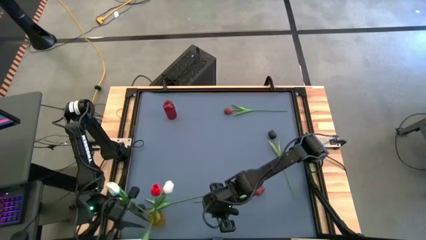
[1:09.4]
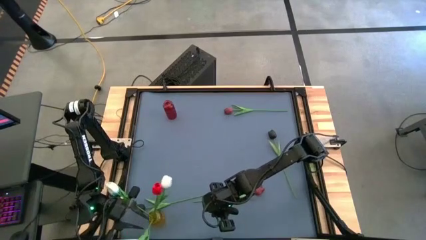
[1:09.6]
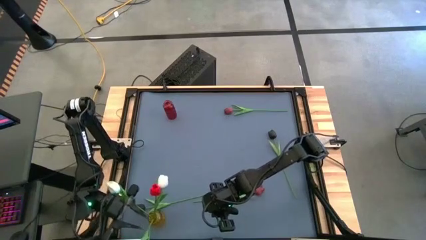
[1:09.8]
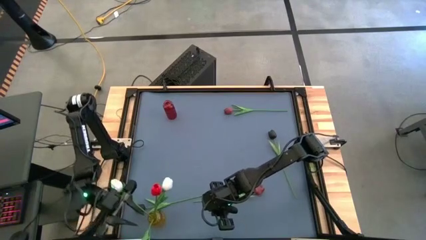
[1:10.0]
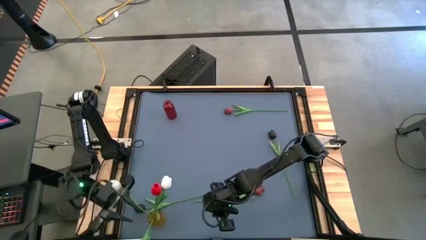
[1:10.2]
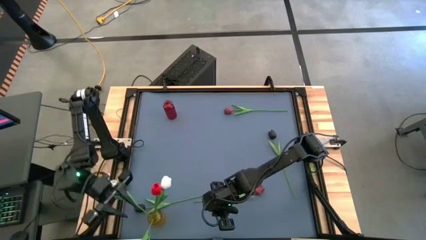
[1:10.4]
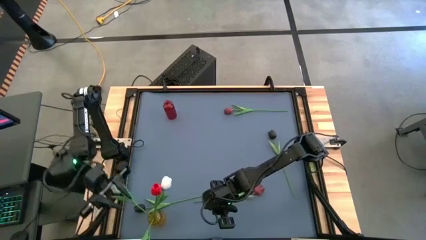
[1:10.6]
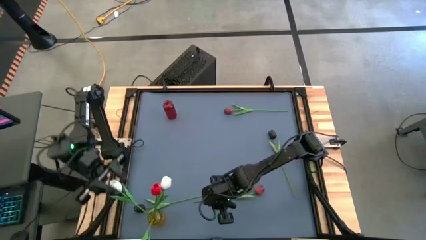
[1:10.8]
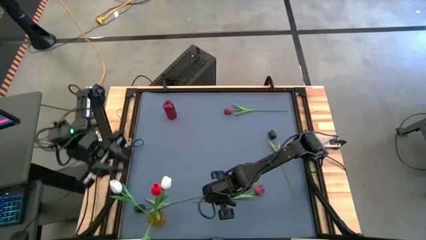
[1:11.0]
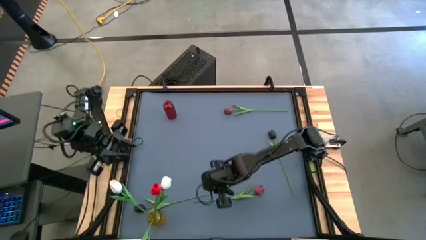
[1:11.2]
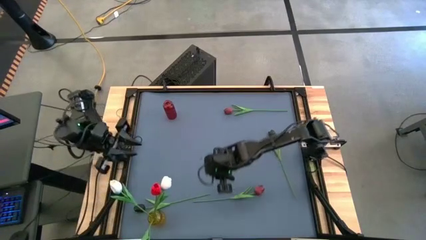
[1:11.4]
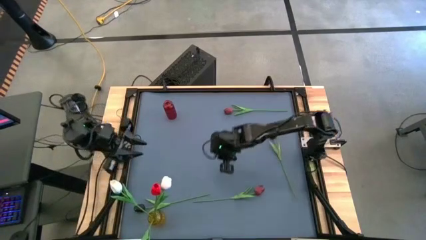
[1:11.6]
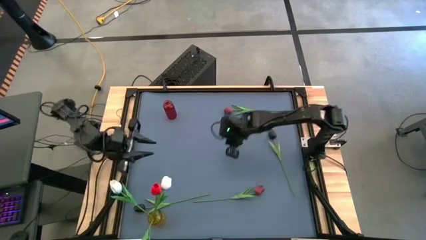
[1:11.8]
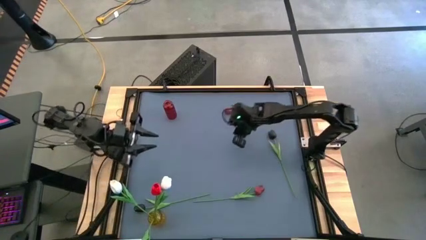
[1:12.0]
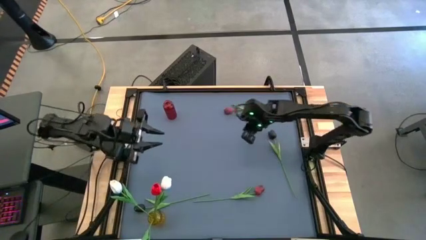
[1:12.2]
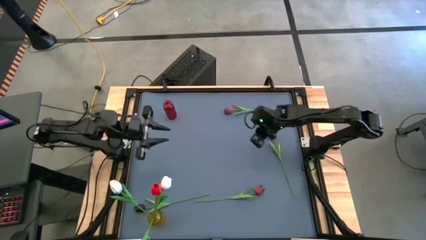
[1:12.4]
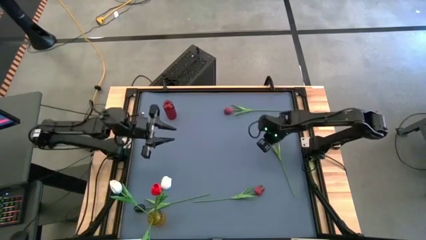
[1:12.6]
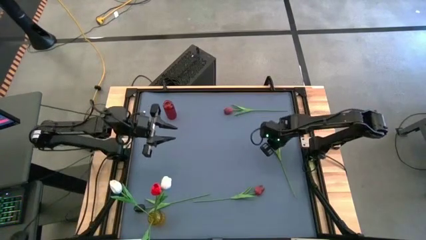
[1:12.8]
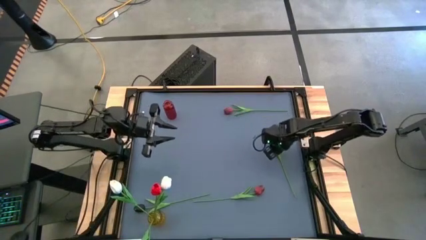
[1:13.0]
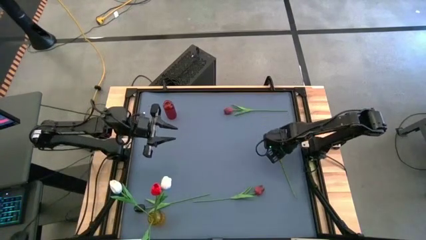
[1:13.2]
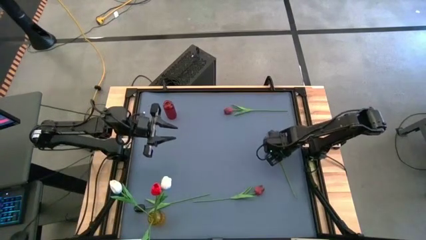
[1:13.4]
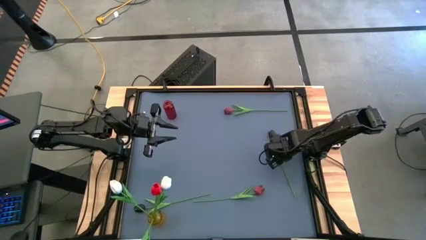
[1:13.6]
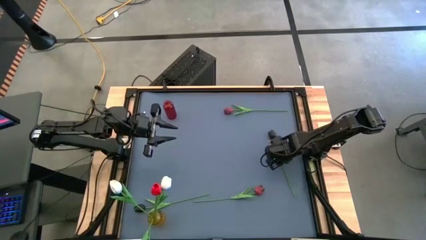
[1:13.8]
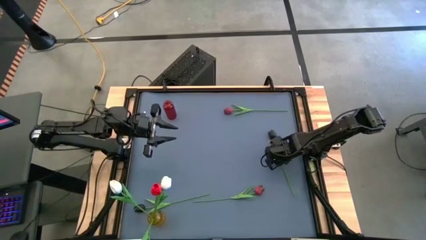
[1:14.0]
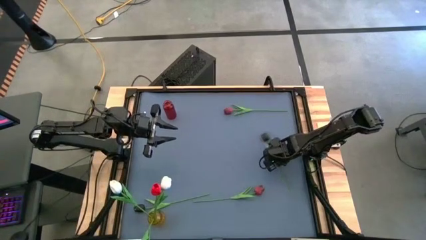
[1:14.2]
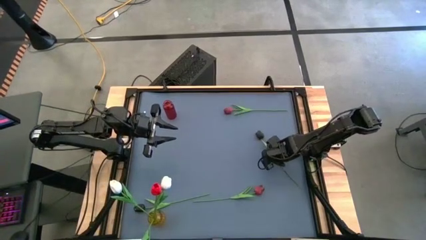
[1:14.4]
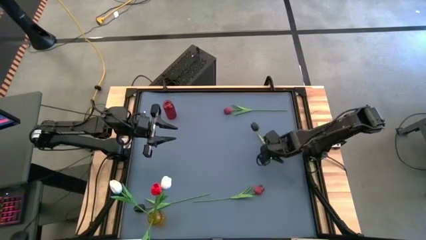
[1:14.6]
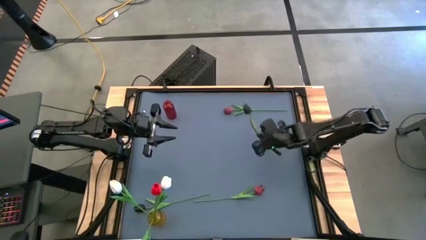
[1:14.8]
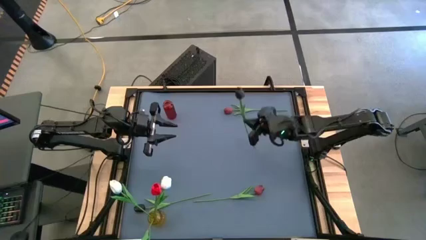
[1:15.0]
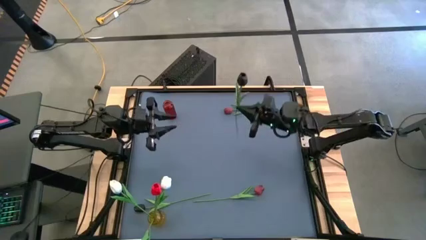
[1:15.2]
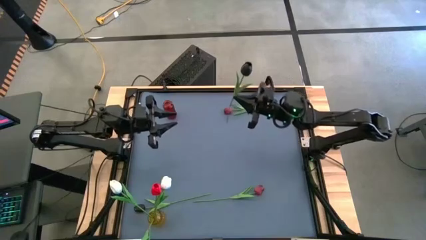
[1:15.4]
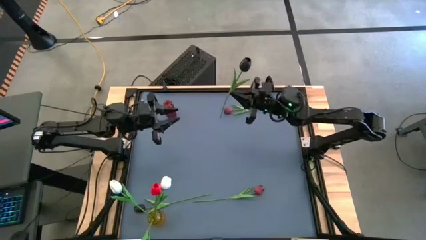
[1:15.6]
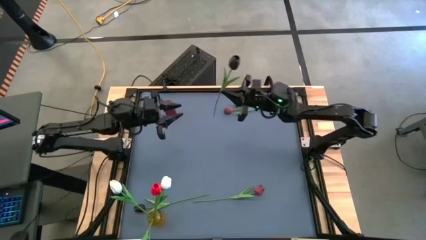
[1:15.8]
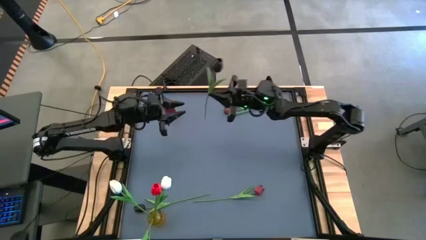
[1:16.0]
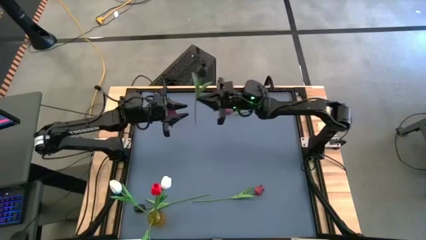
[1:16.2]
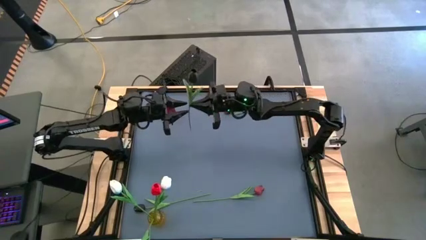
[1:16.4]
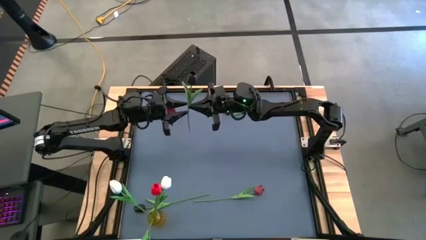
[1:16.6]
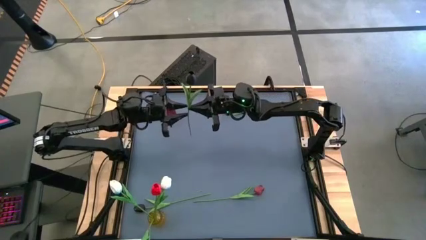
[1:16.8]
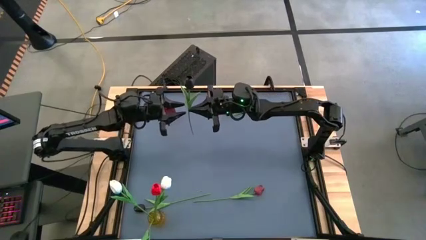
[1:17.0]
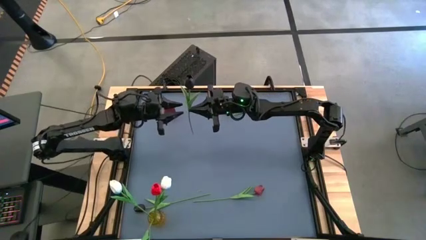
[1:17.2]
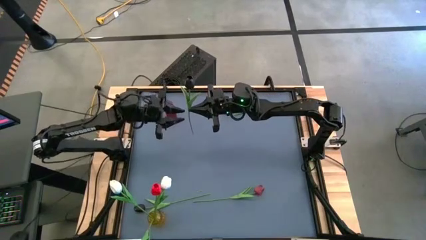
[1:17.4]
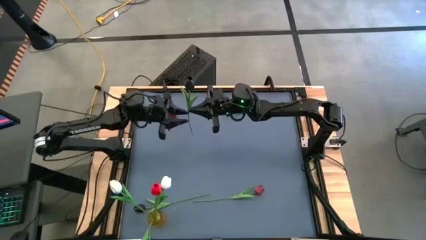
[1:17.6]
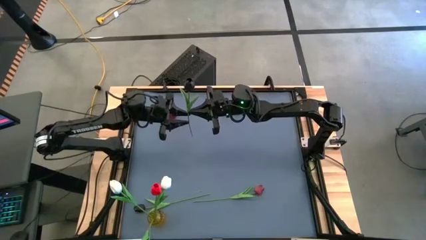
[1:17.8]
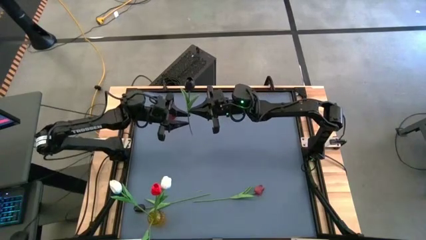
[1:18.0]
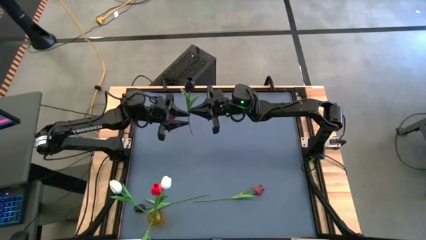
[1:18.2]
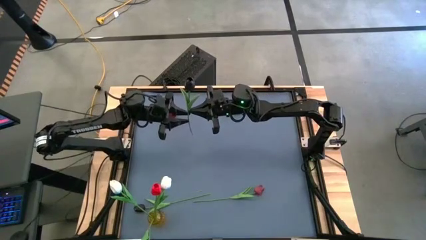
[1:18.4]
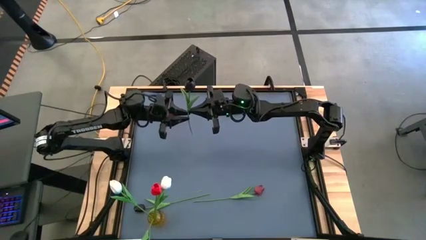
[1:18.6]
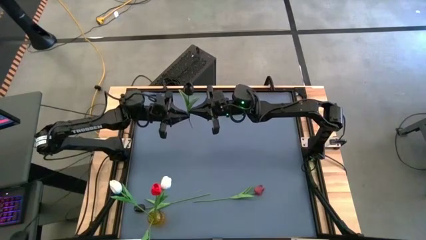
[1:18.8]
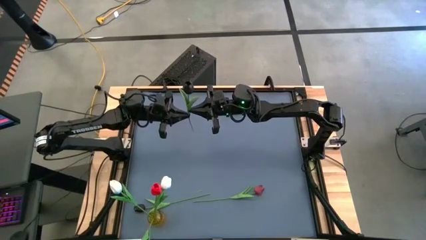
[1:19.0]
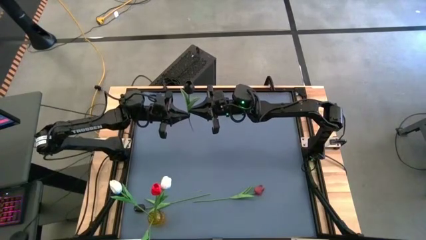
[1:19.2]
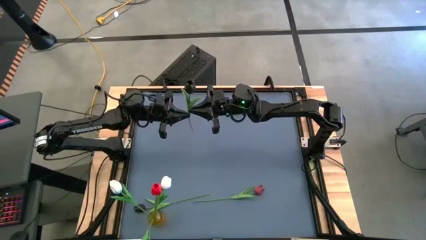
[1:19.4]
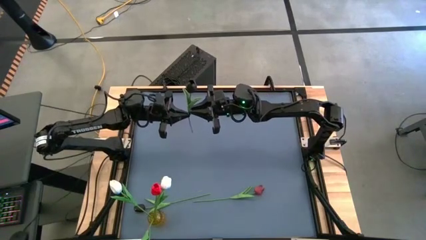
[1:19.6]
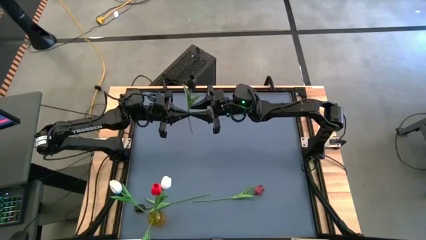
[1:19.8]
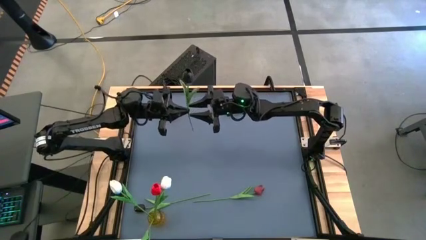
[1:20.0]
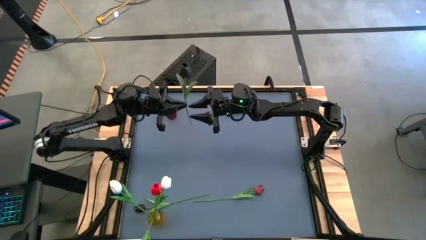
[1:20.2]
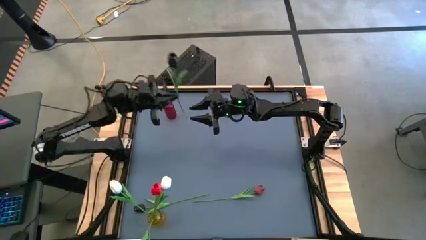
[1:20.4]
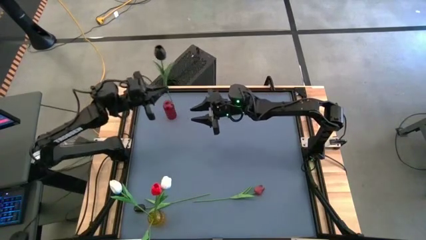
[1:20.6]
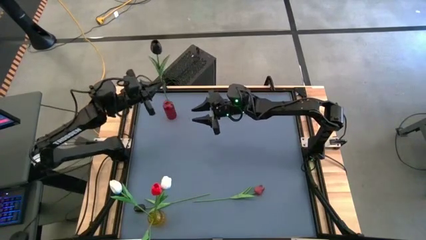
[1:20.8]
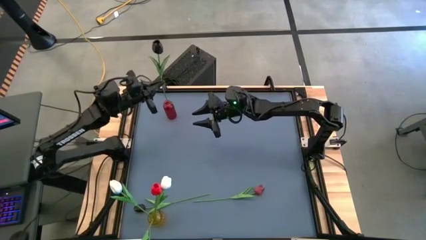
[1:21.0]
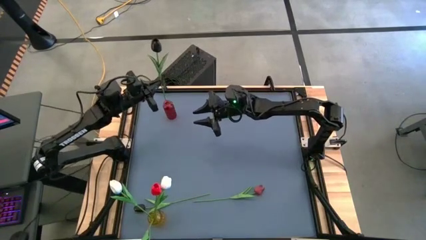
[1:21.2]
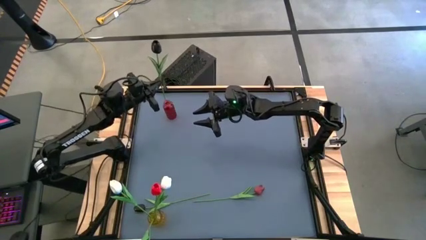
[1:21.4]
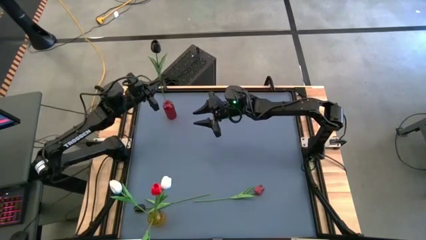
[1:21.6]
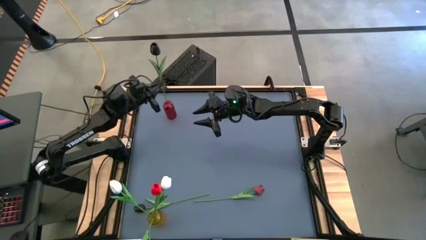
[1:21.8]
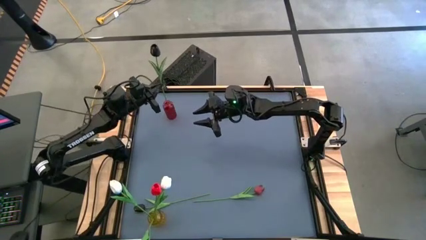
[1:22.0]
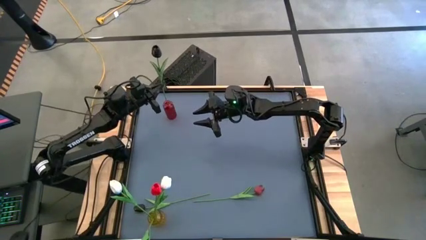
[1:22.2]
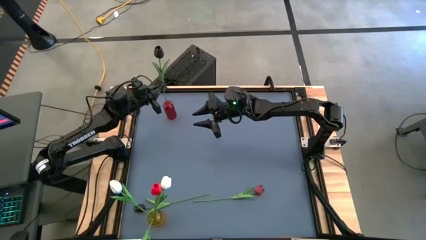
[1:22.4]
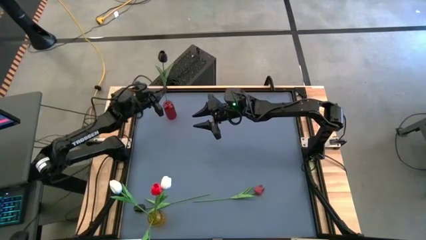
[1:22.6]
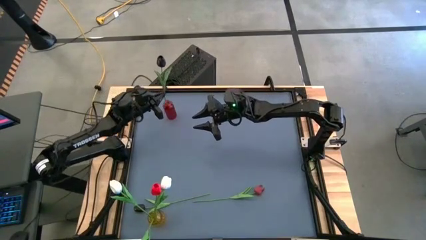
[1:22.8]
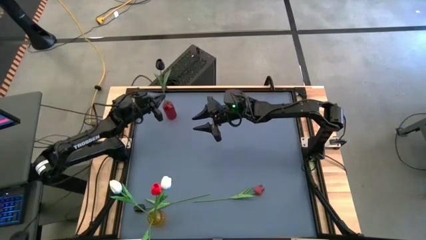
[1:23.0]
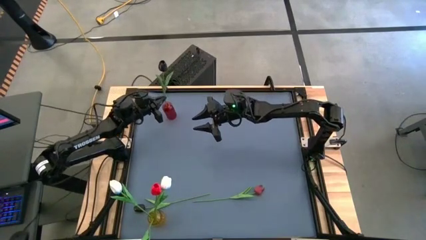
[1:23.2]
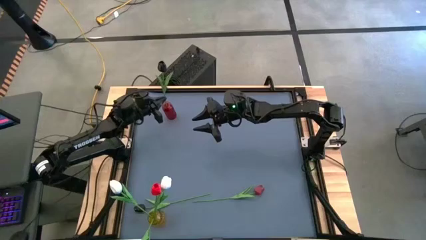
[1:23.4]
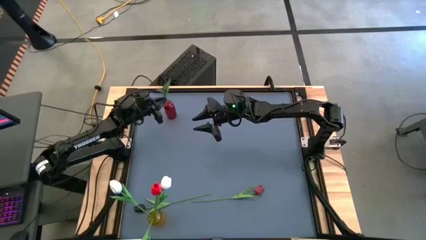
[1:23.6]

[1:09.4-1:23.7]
Task: Sort flowers into vase by color
Put the right black tulip into the red vase
